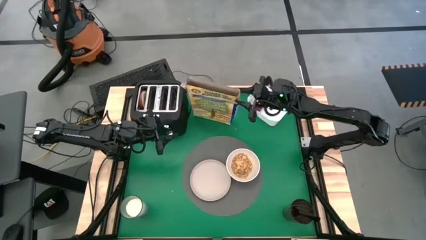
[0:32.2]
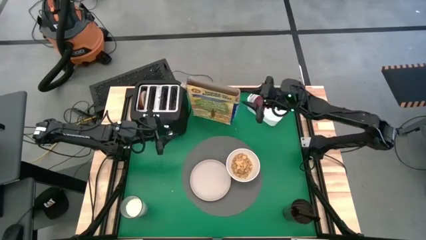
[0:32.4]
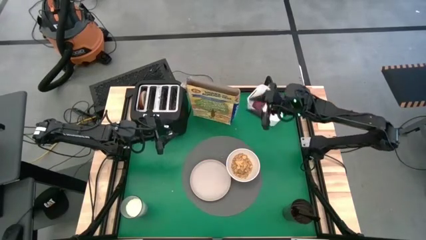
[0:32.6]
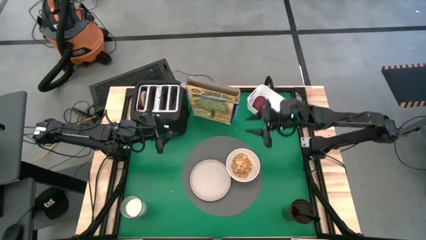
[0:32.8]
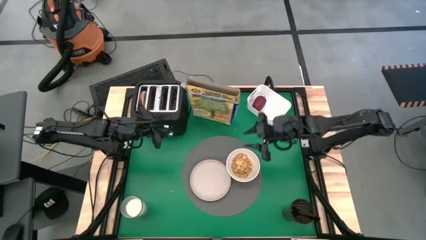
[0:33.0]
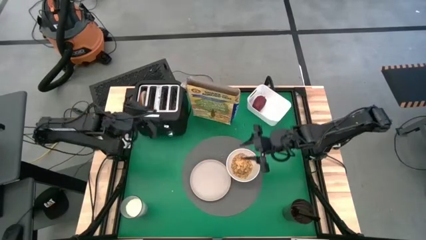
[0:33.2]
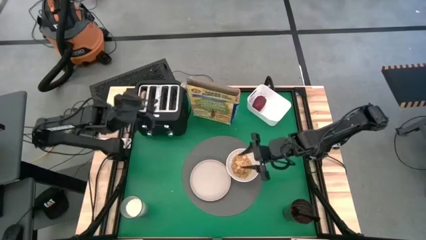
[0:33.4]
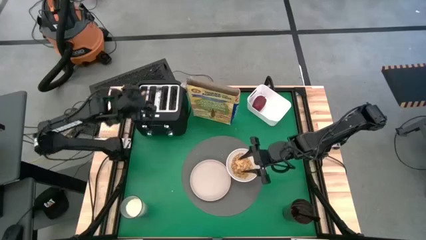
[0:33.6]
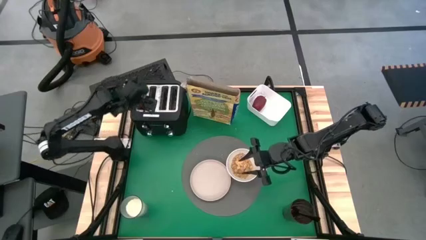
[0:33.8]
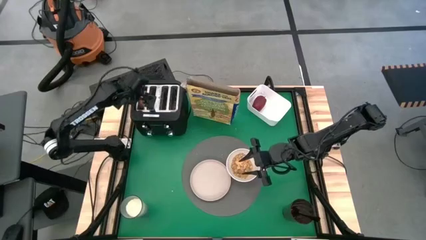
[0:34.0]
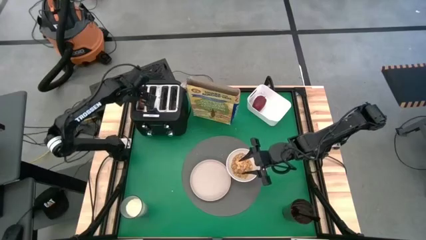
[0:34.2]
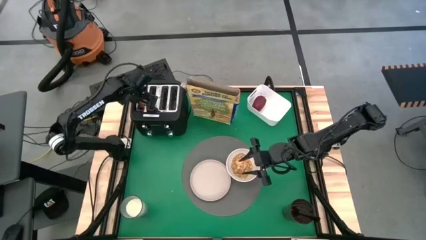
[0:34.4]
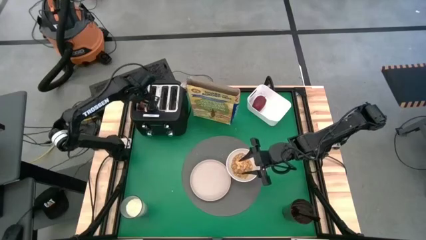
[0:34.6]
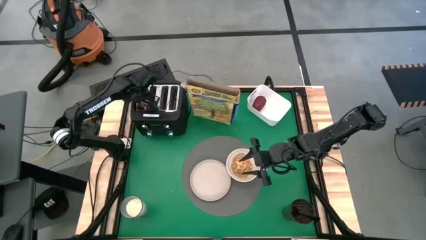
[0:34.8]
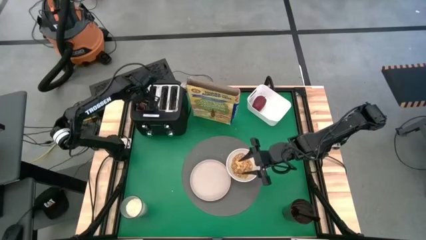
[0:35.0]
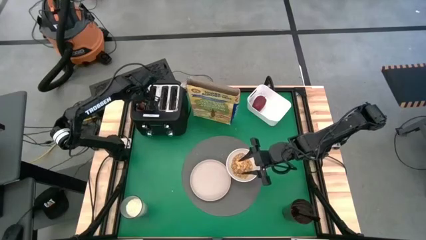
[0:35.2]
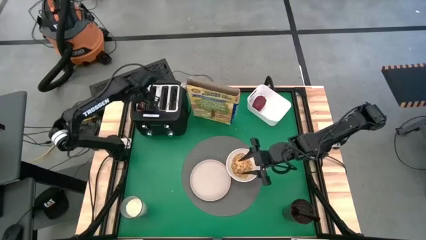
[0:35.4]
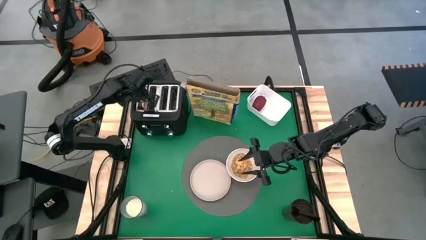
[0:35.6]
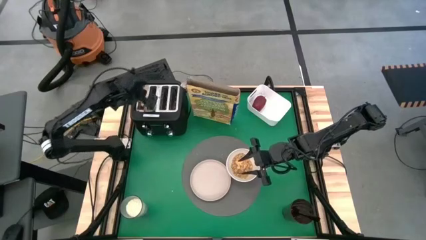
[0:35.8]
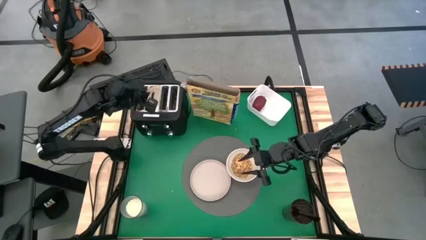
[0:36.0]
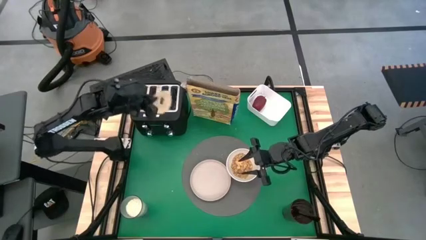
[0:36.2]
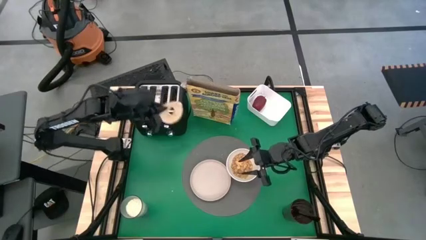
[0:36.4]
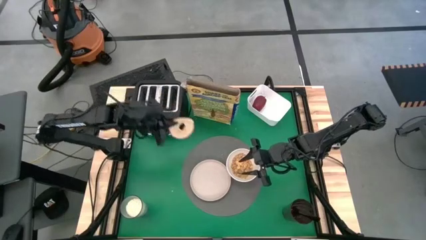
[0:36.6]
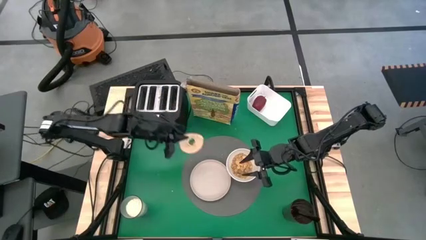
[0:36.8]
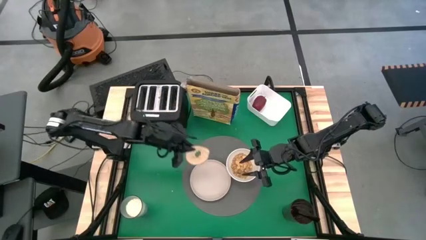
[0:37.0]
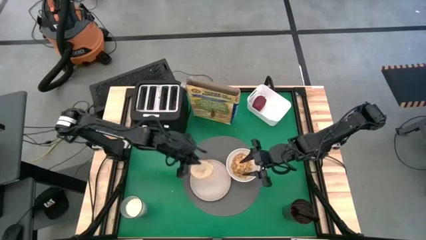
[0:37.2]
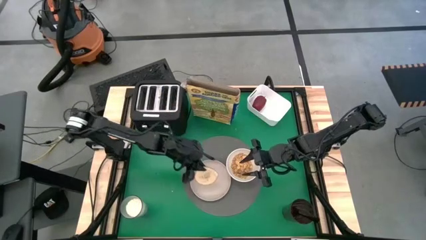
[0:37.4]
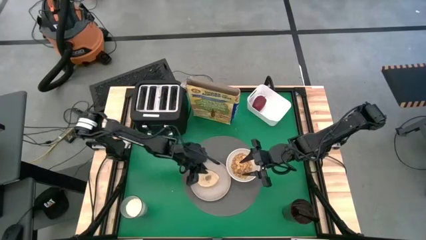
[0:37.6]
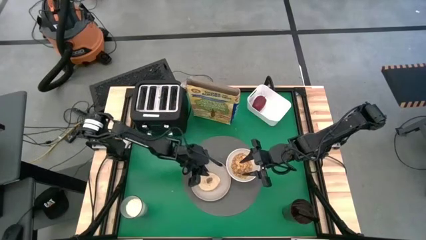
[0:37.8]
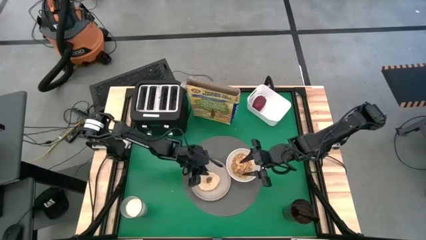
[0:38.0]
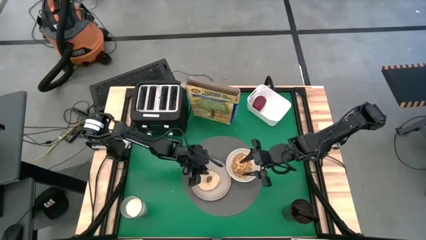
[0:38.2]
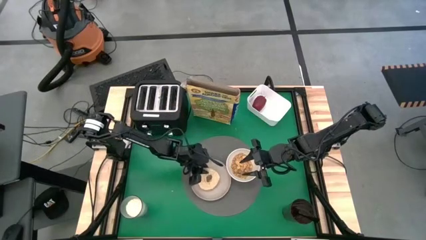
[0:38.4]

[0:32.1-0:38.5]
Task: Arrange a breakfast setting
Put the toasted bread on the dark white plate

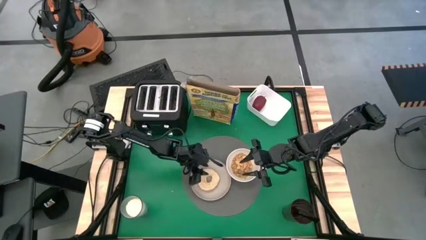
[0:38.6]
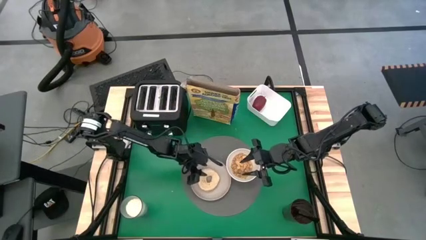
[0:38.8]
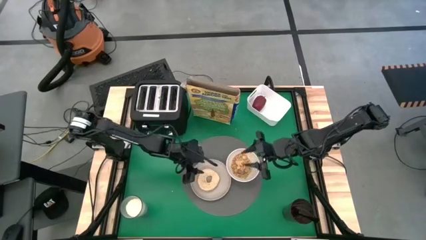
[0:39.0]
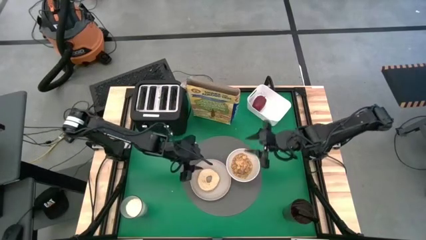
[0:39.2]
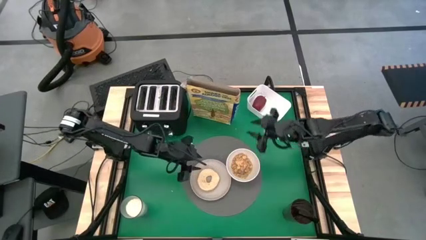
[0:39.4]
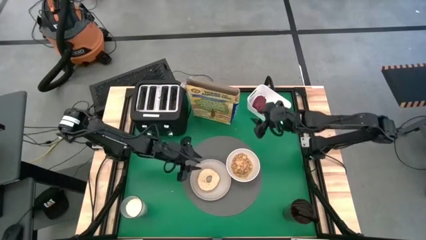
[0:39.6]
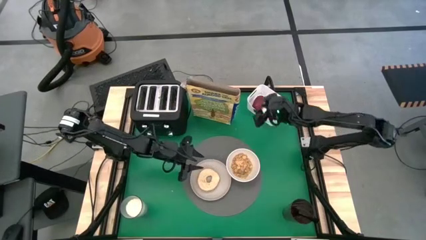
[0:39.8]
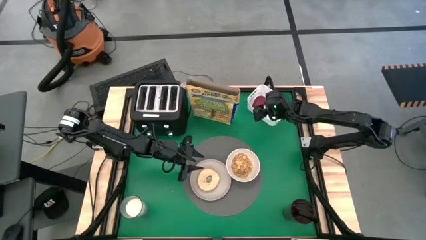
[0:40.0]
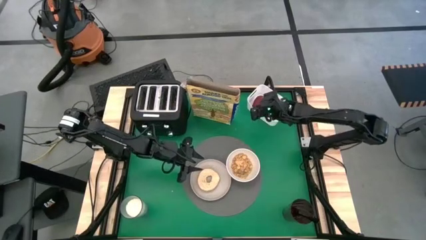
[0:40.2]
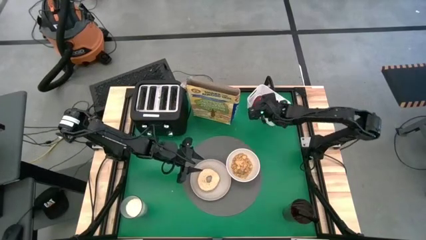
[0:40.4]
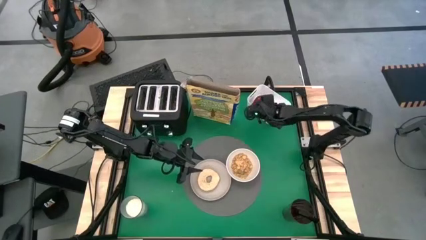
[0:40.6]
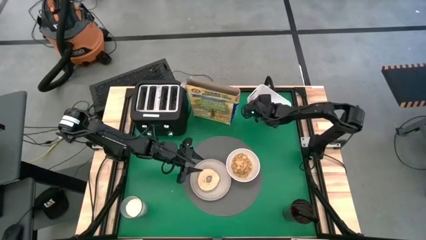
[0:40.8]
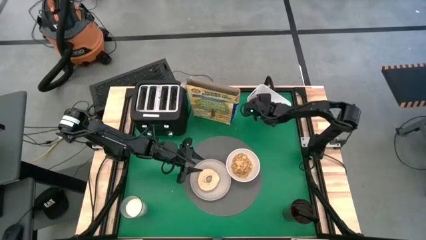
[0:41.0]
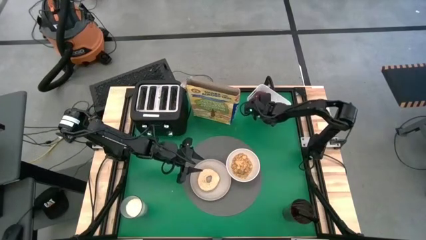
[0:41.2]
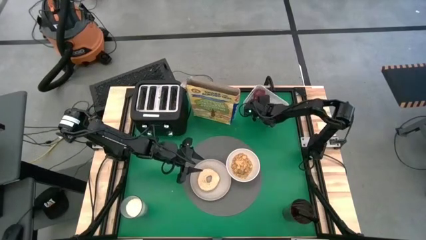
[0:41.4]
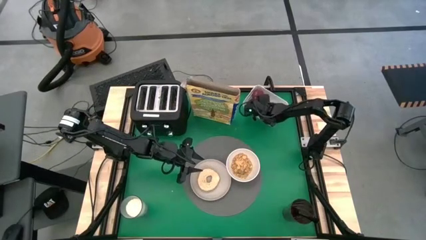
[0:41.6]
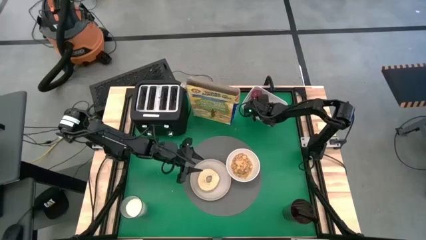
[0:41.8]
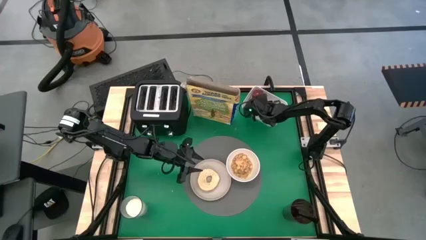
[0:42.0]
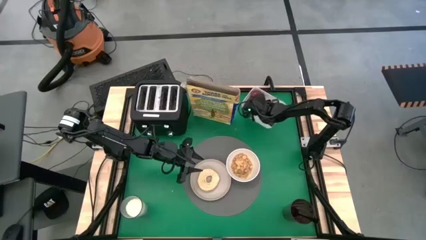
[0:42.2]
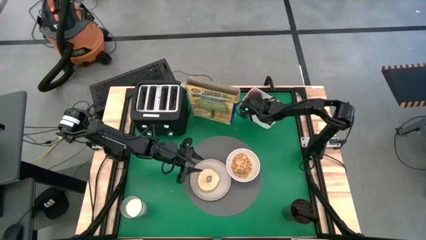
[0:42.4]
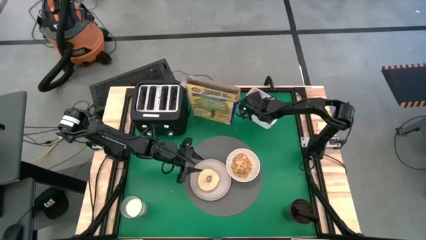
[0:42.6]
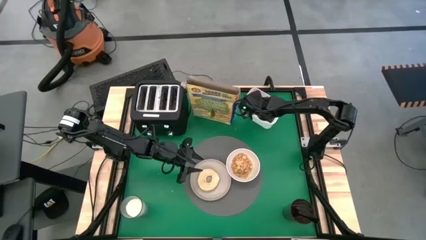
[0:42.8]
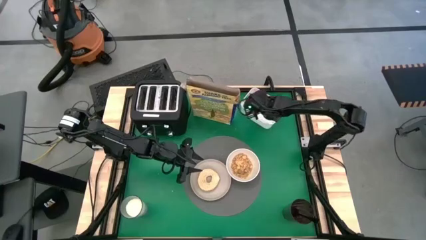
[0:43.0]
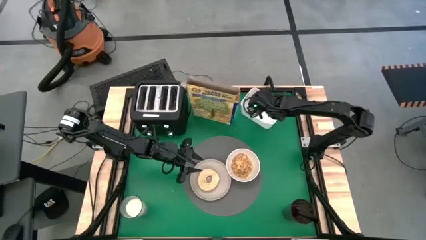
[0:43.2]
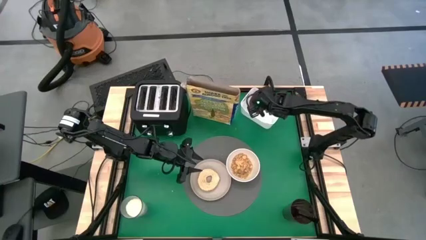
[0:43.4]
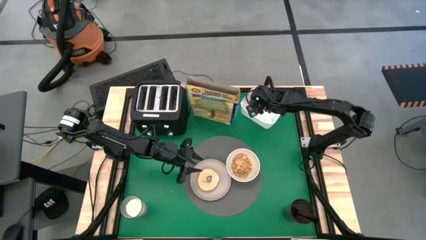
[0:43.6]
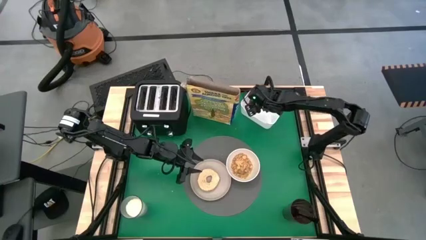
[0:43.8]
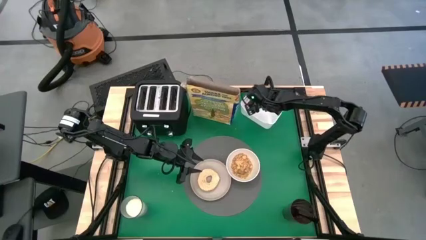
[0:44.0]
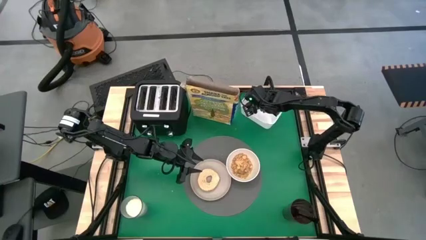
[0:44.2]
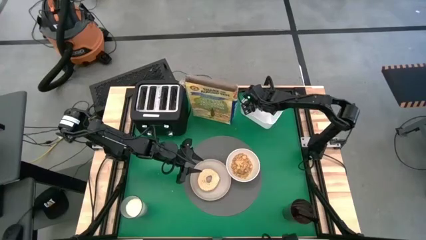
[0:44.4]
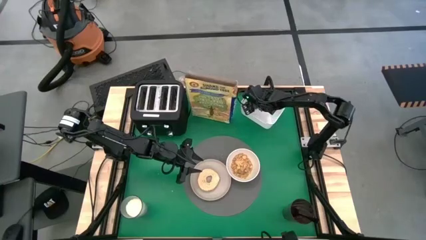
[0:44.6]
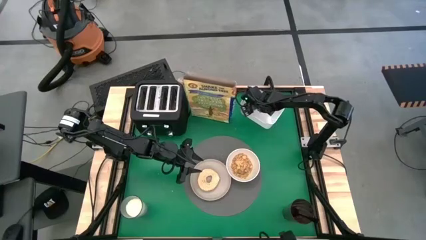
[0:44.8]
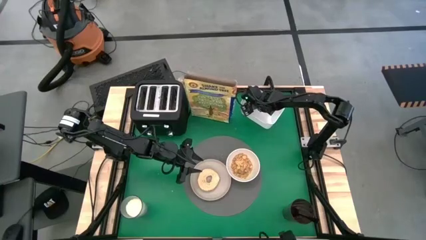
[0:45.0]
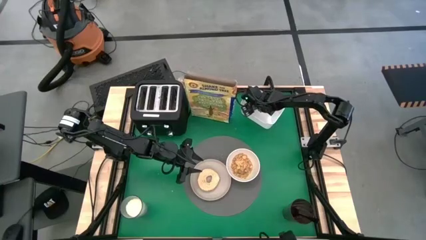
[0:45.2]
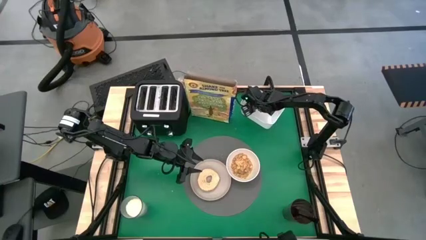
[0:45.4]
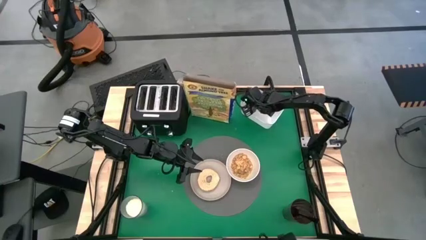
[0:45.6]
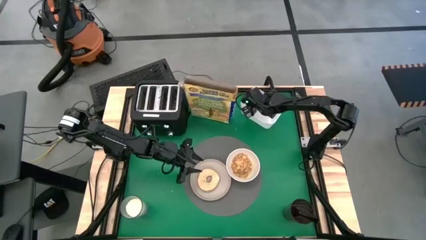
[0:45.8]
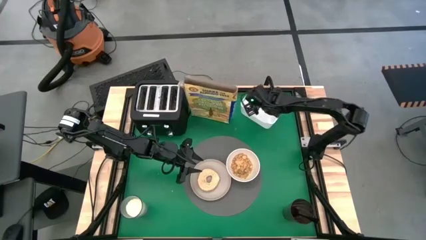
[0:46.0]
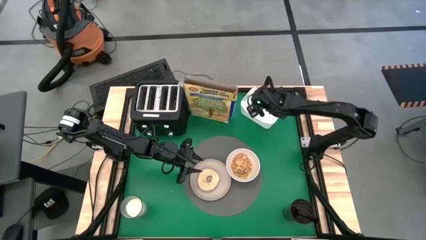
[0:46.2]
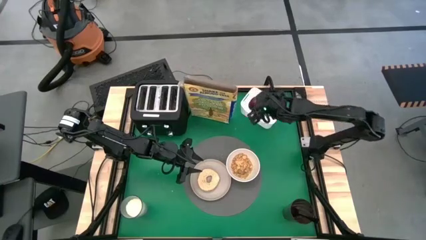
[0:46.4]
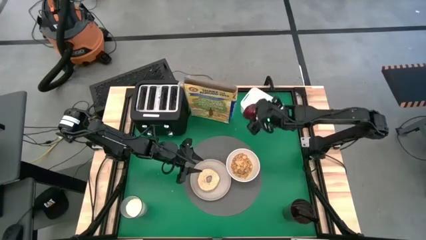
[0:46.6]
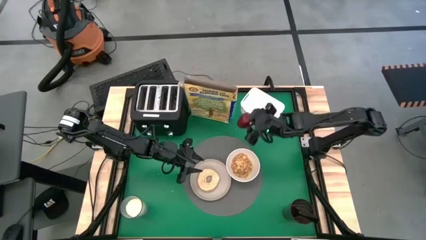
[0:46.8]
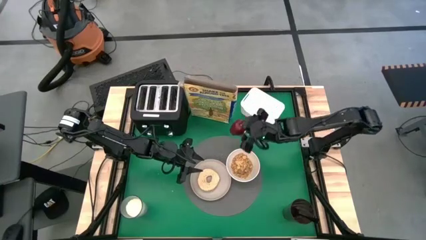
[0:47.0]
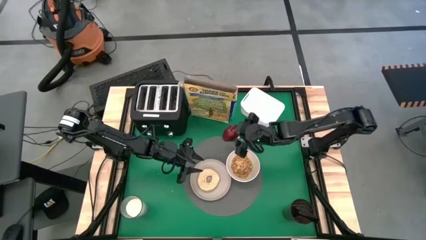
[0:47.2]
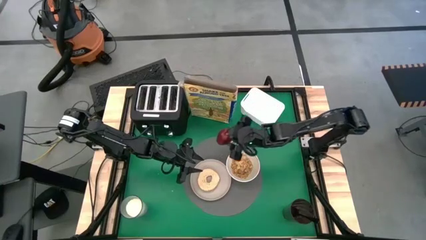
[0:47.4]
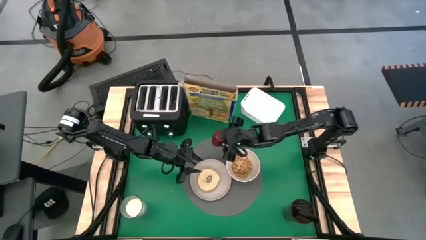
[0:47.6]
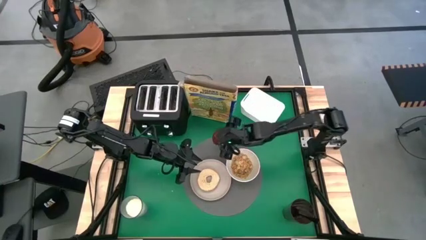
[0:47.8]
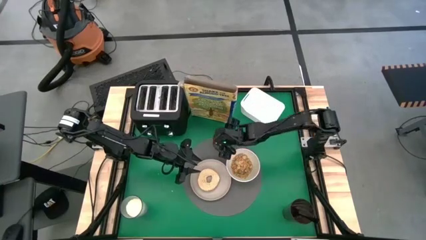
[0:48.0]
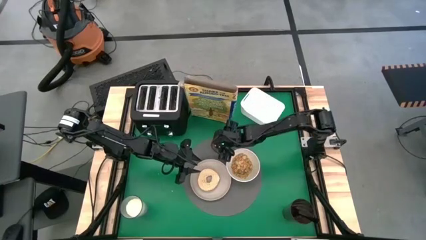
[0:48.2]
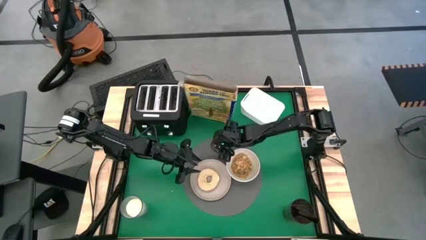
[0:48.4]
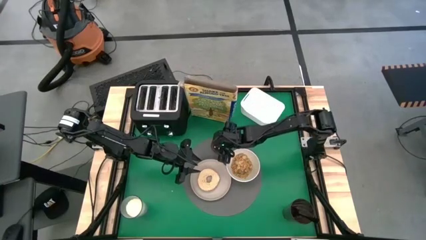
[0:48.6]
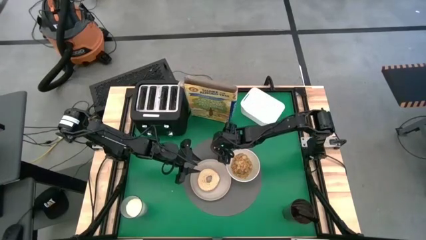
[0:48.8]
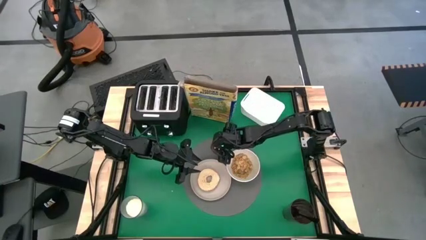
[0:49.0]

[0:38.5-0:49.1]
Put the apple on the table placemat to the top of the dark white plate
